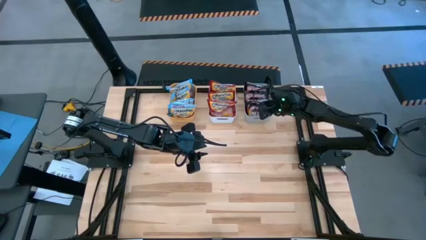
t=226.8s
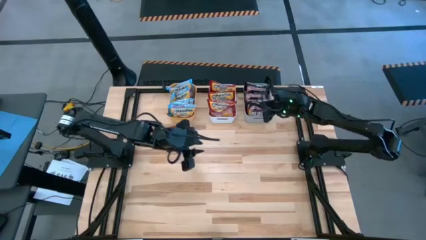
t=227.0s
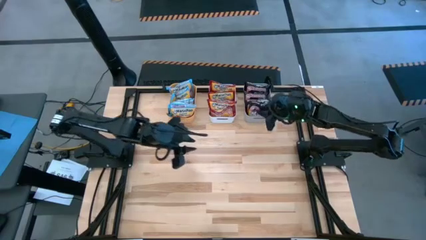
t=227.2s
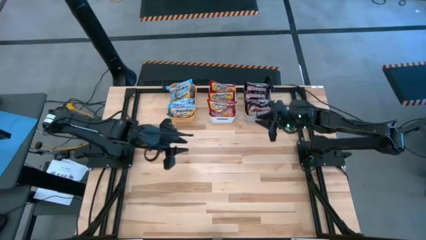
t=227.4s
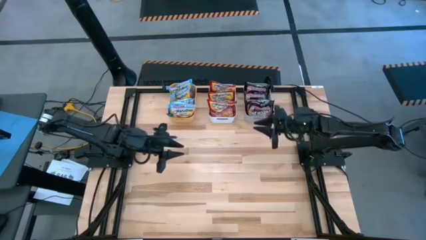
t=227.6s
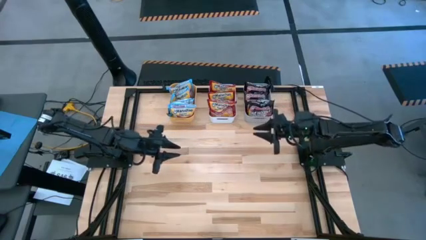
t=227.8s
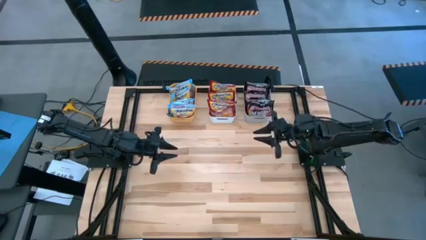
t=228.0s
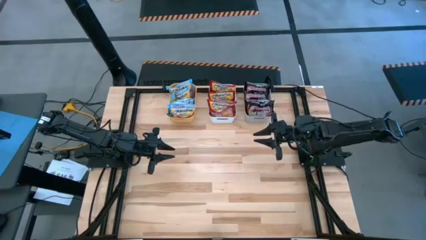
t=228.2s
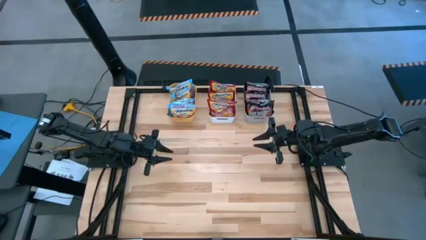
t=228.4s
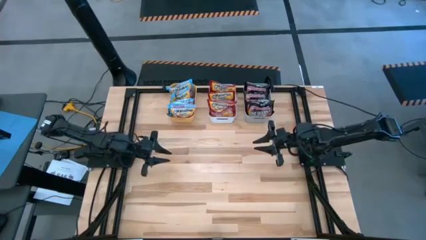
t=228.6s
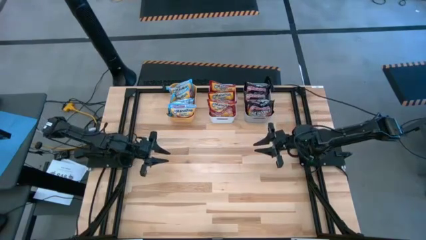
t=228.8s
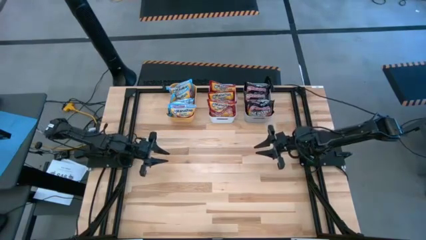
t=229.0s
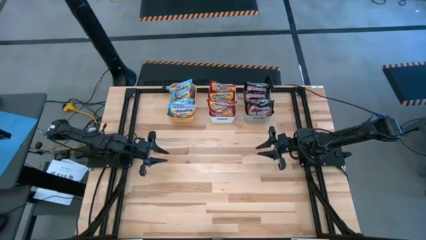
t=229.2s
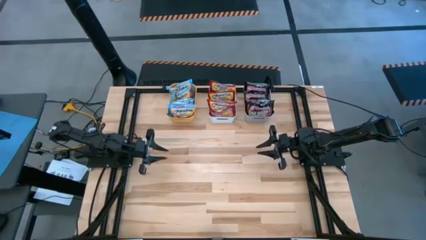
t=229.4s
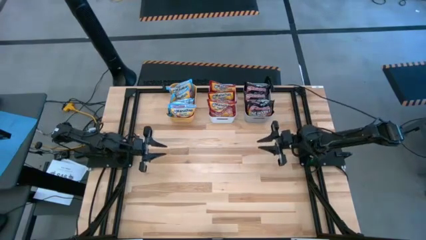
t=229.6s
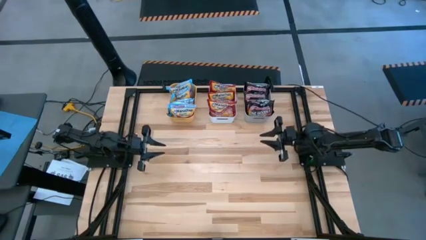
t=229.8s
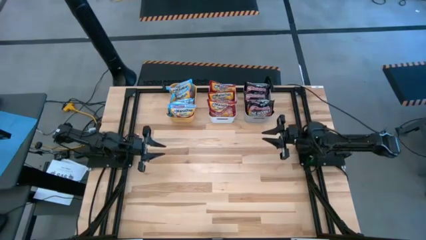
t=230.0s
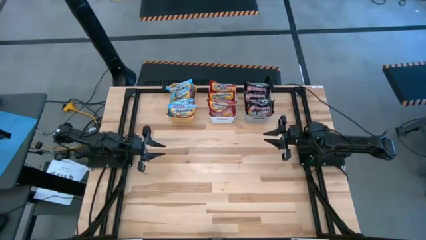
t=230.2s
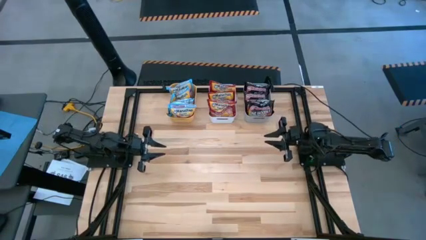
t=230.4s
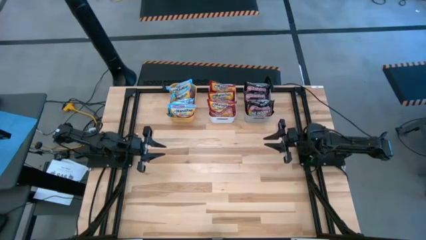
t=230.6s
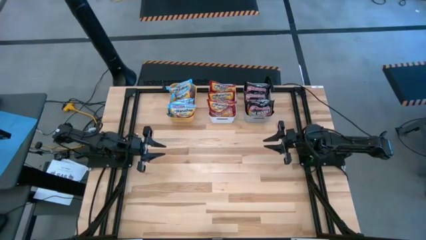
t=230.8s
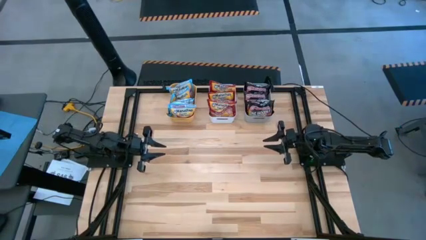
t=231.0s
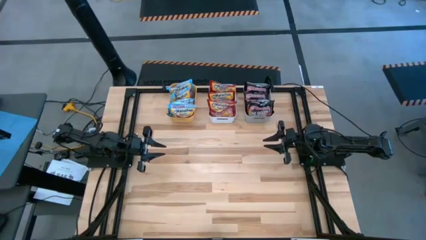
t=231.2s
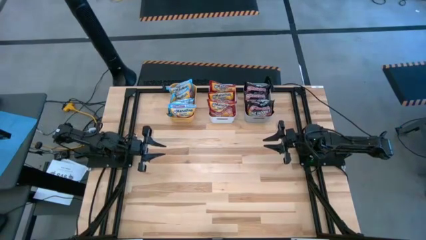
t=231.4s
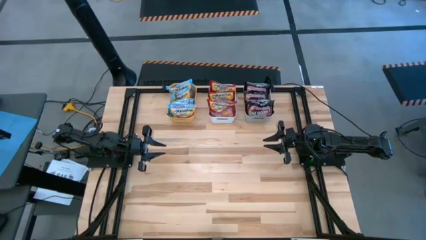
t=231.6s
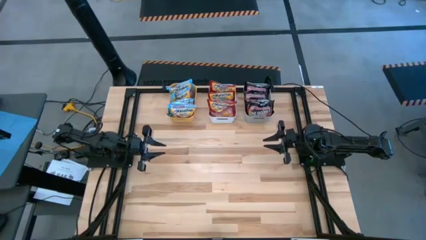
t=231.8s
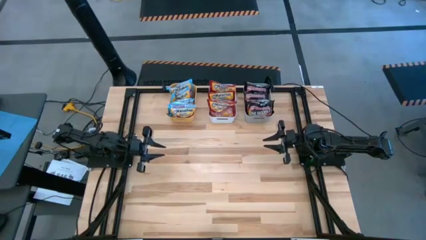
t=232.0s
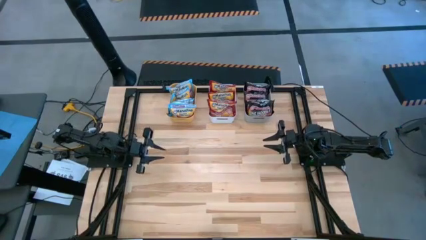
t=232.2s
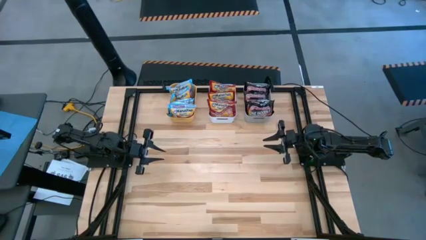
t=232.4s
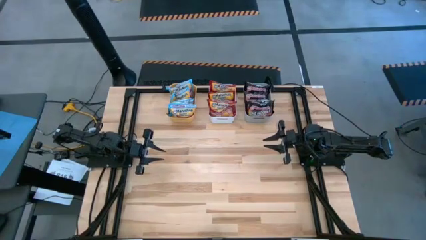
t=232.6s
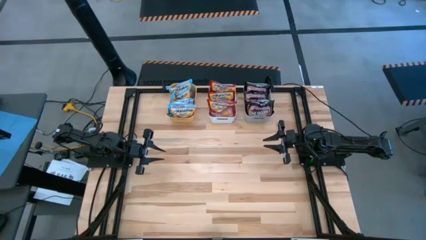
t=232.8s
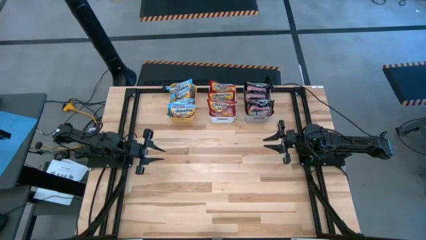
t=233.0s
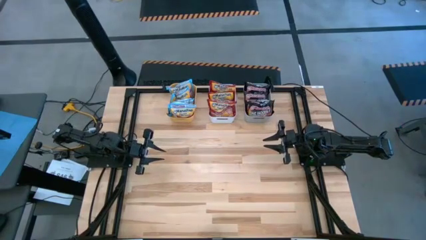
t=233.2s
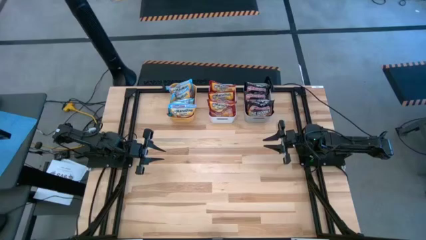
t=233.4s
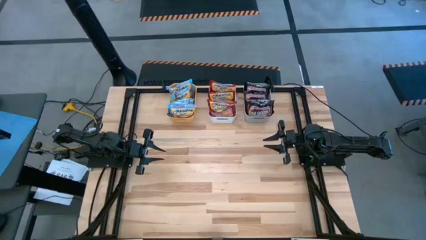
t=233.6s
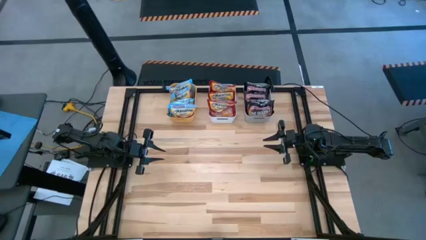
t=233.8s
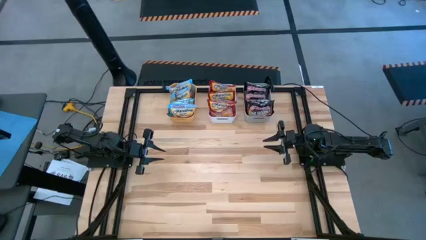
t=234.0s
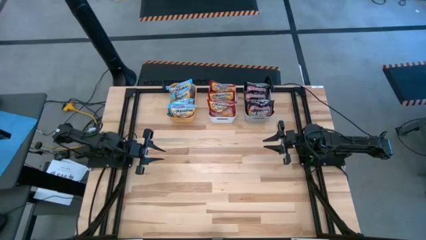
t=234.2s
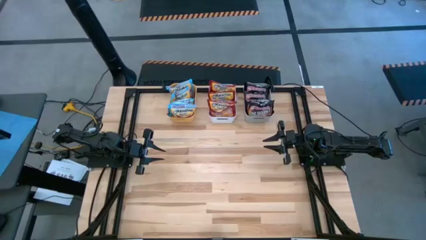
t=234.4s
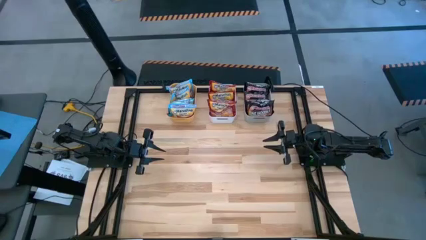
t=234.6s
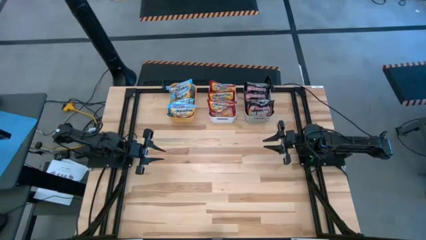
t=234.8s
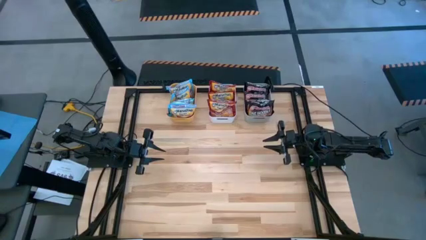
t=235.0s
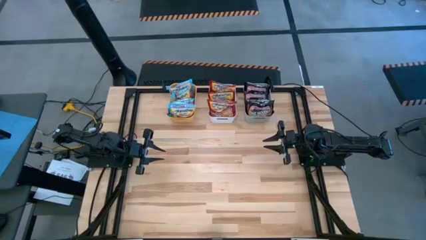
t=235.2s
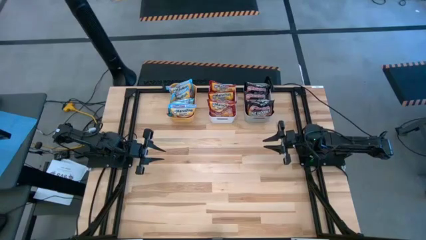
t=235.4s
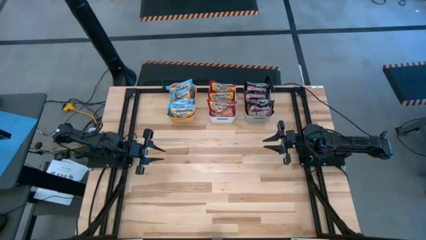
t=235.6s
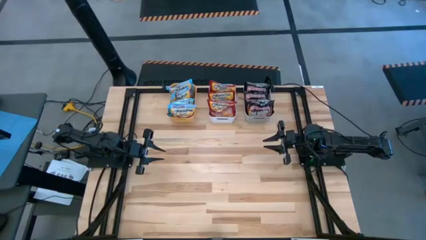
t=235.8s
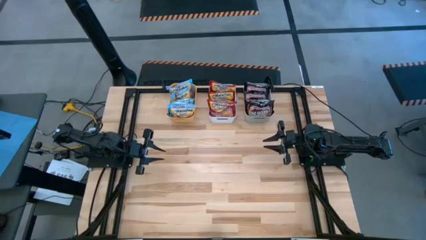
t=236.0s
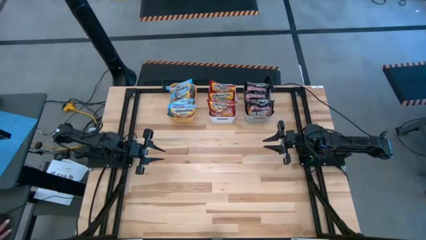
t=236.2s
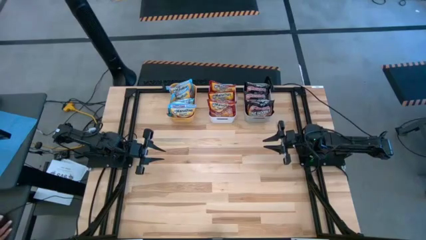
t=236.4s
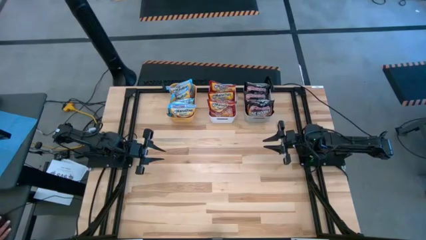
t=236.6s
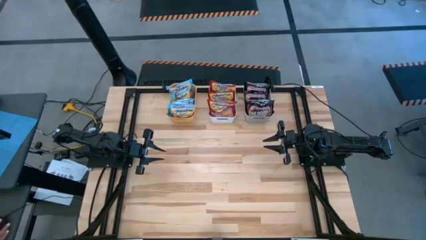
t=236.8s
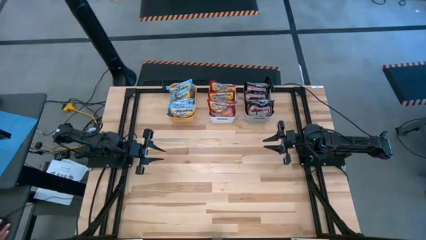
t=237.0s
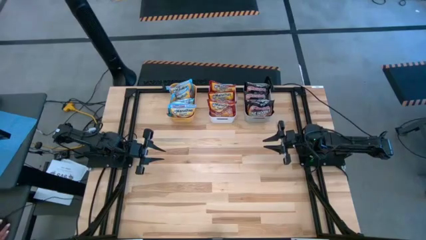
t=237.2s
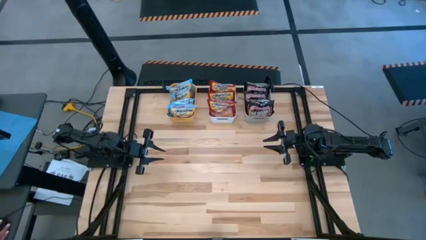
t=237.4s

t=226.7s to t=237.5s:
Task: Sort Maruchan noodles
Return to Home Position

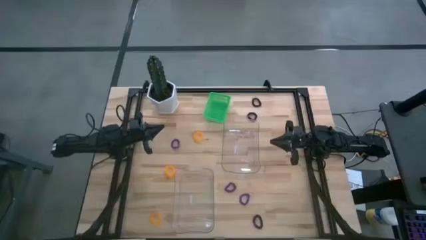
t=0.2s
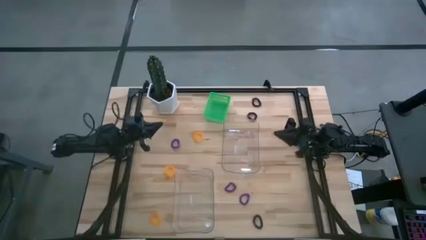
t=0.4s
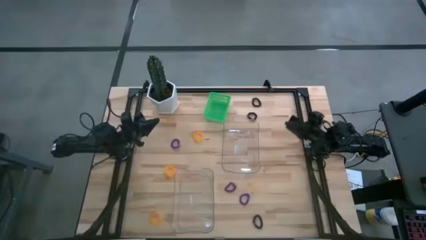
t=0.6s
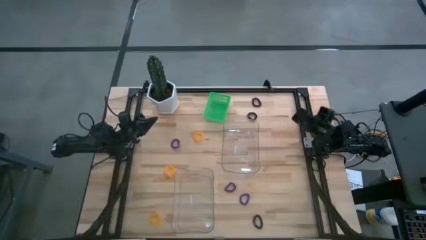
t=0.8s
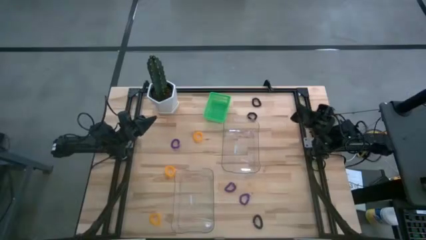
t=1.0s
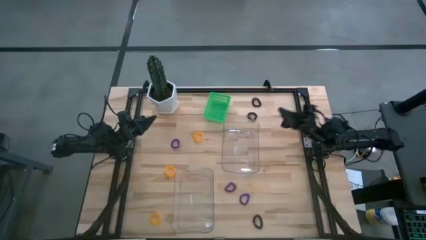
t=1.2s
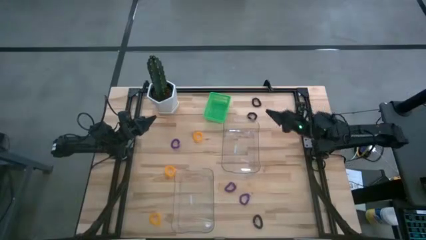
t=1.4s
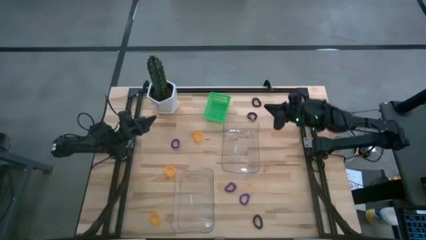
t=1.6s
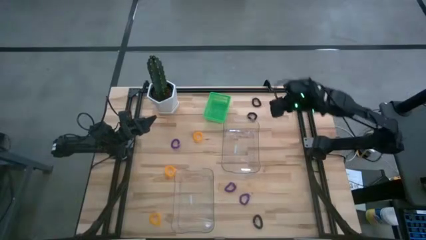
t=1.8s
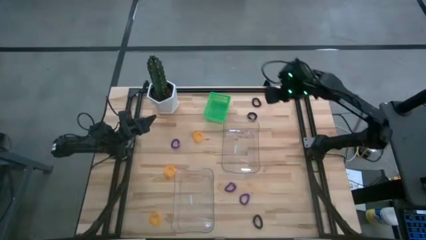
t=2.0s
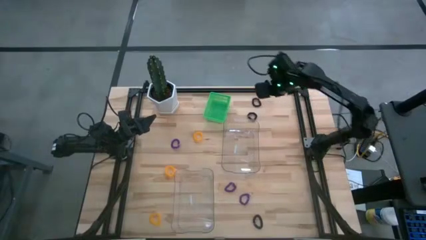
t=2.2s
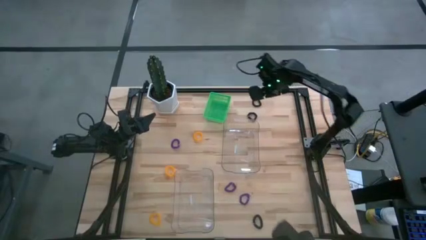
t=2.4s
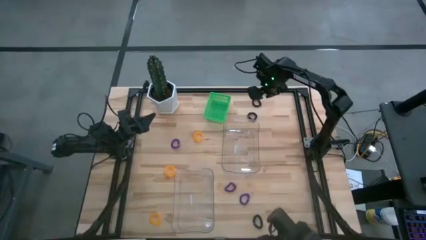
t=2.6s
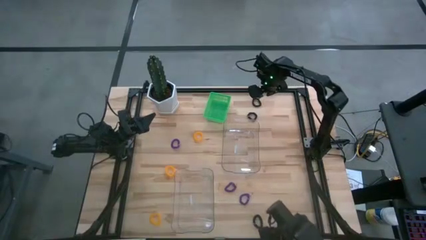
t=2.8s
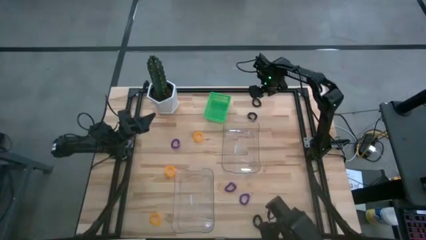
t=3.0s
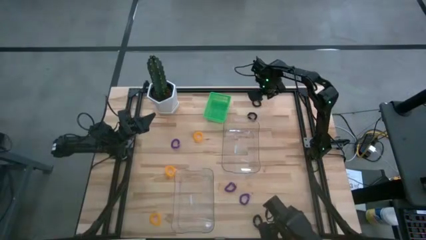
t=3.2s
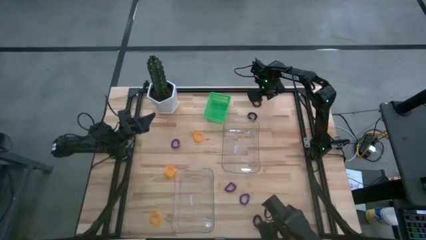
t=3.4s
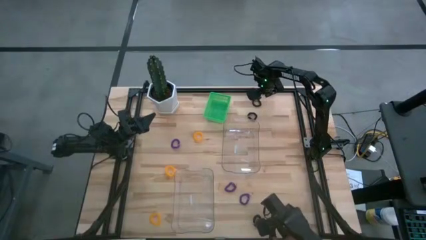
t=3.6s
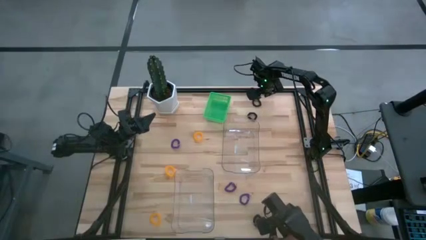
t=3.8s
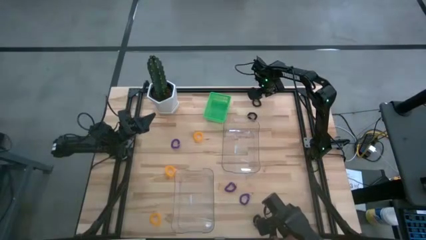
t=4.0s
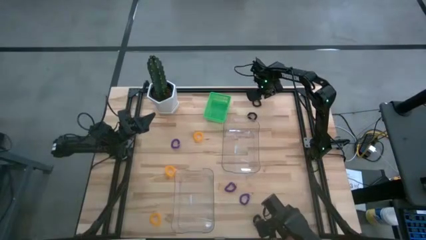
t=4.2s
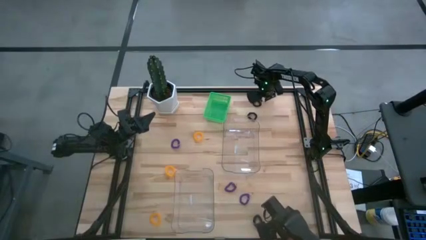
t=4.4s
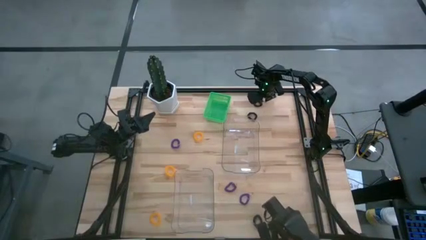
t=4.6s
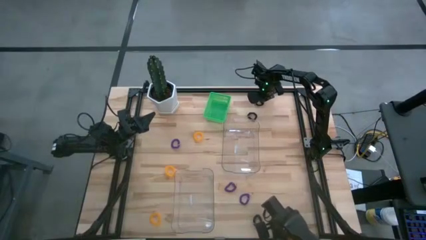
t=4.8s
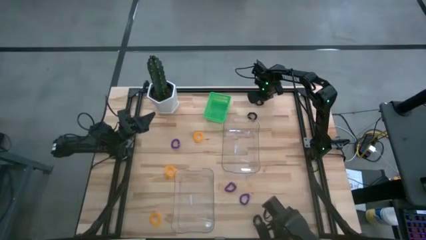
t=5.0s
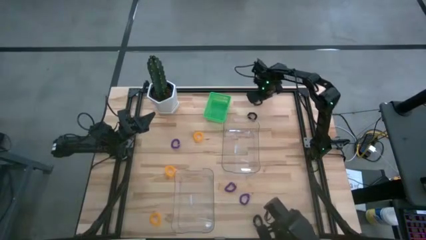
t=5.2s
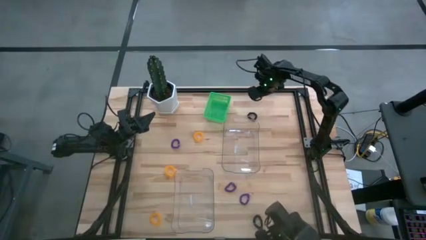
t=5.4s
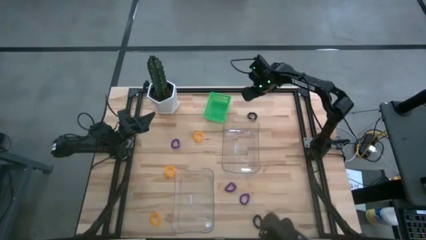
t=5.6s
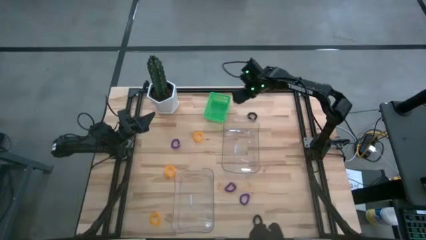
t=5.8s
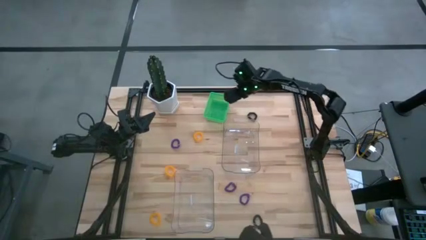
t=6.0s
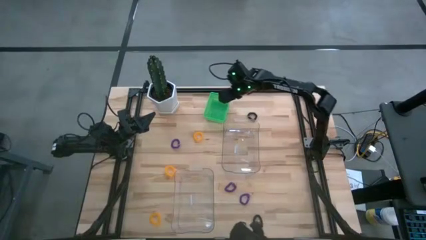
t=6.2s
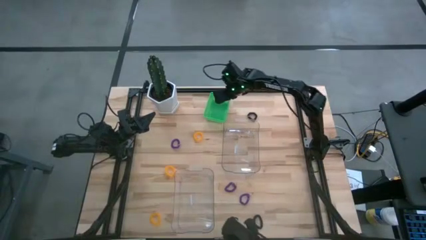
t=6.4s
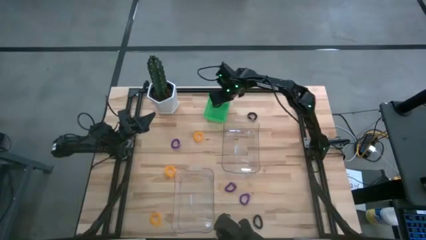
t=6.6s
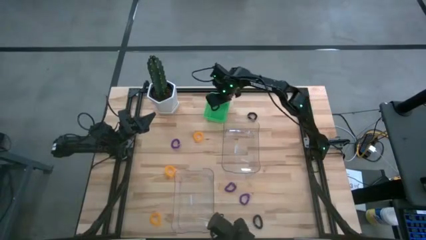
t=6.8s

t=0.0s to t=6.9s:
Task: Sort spring keychains
Put the top black spring keychain into the green bin
